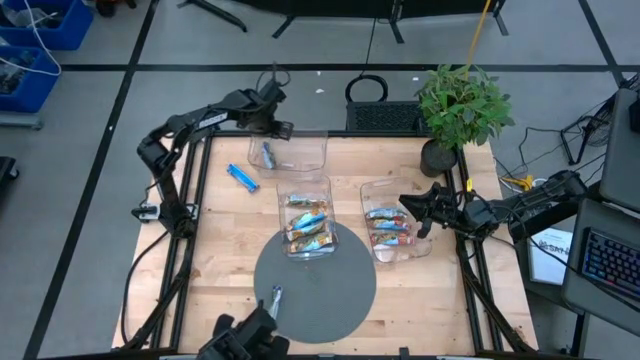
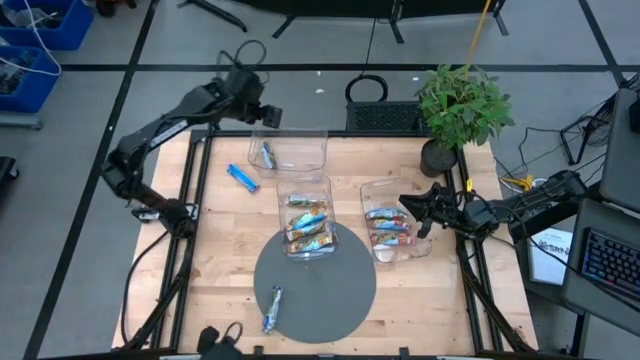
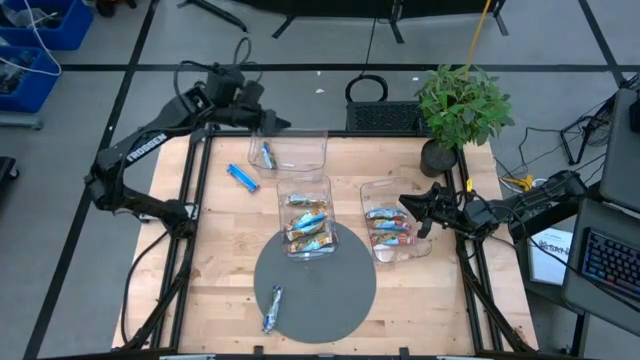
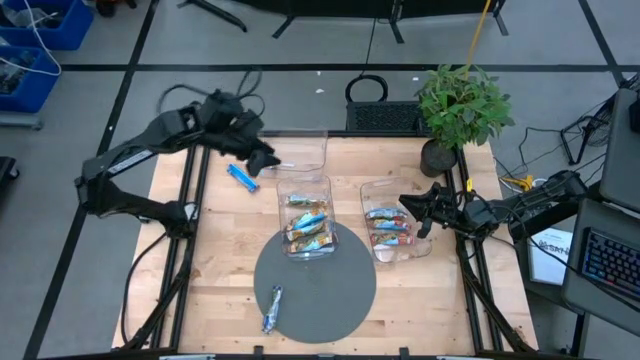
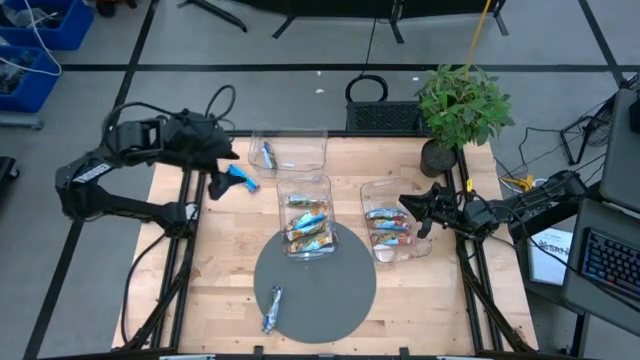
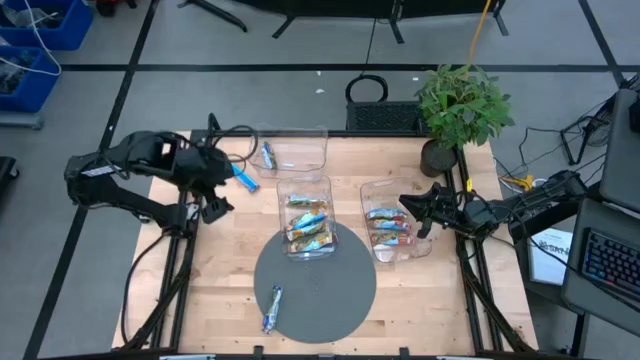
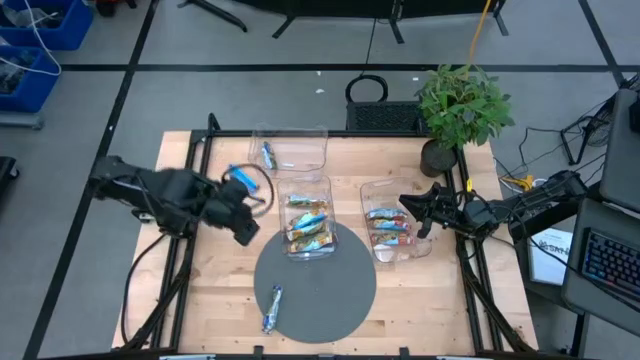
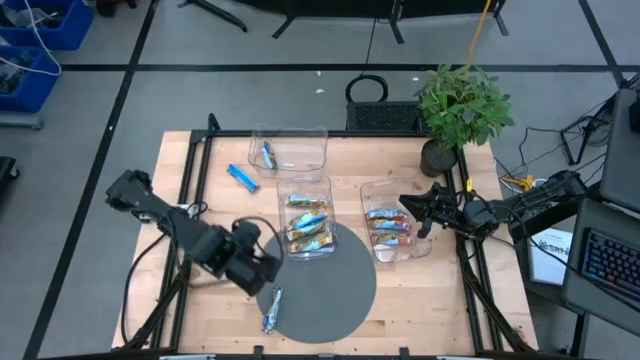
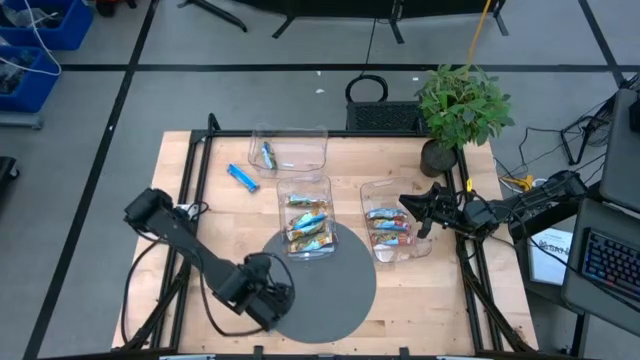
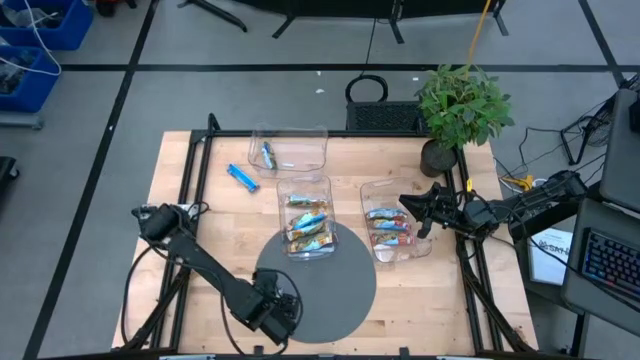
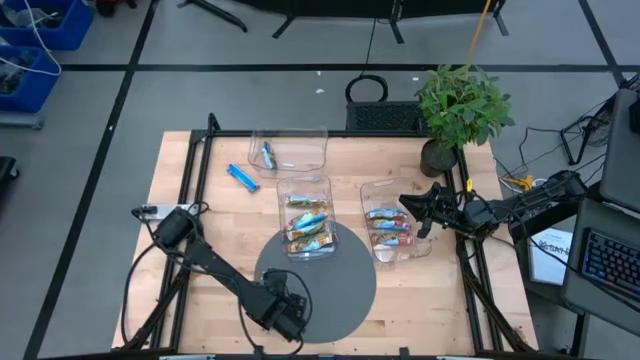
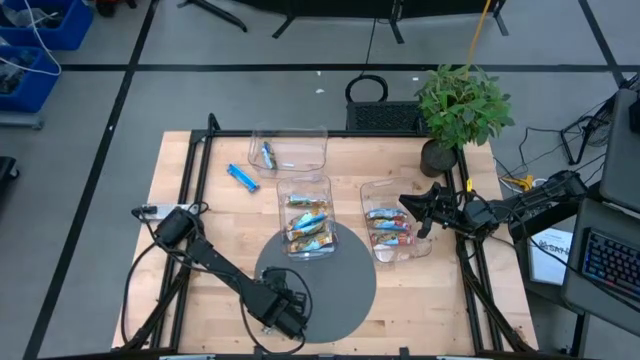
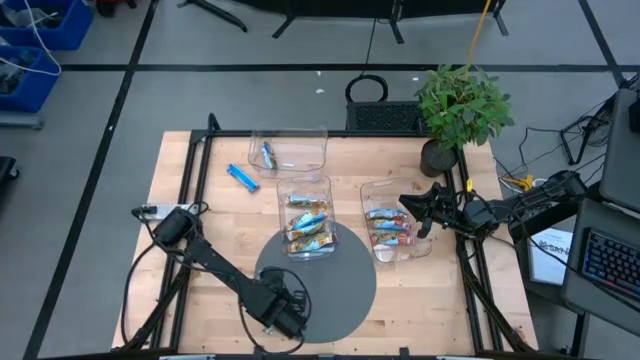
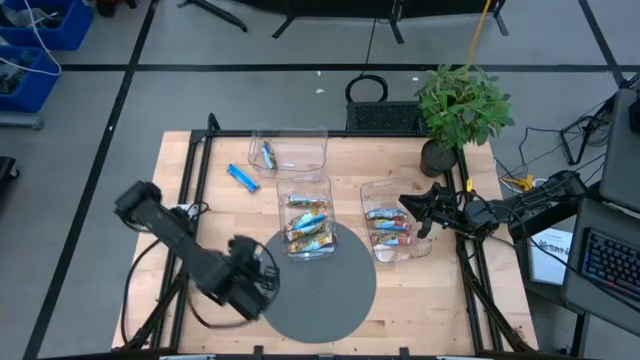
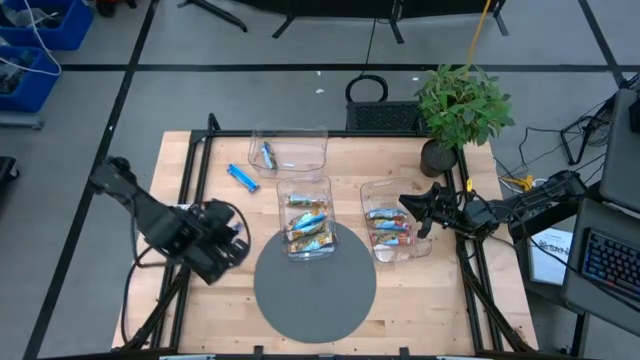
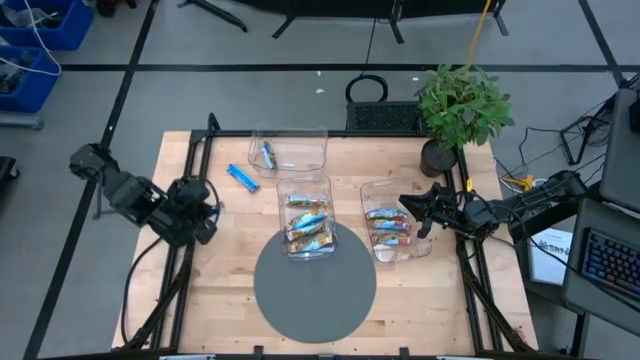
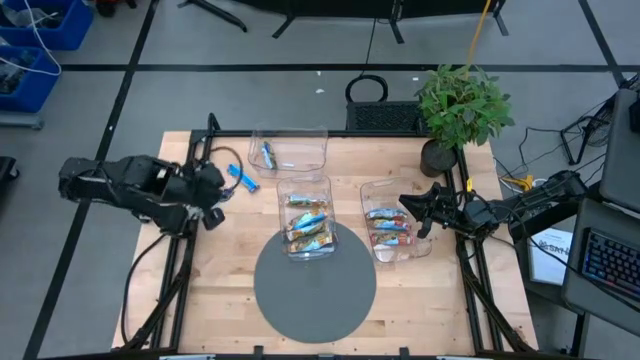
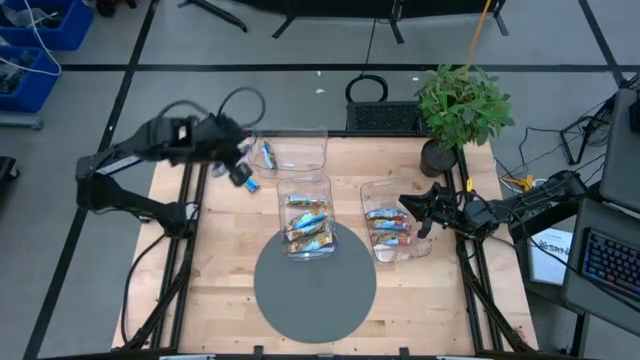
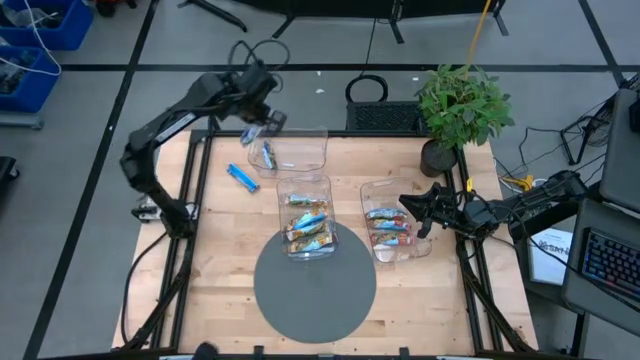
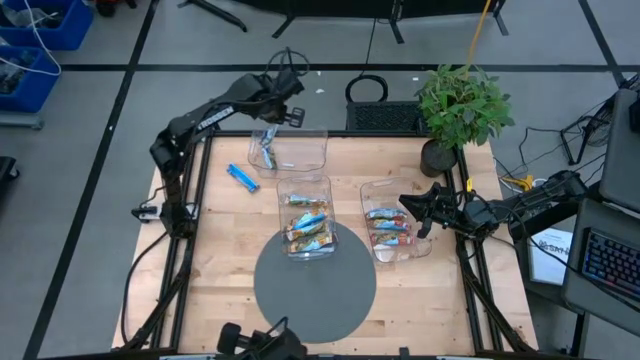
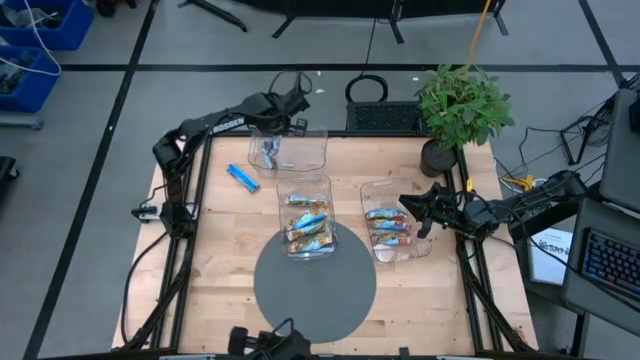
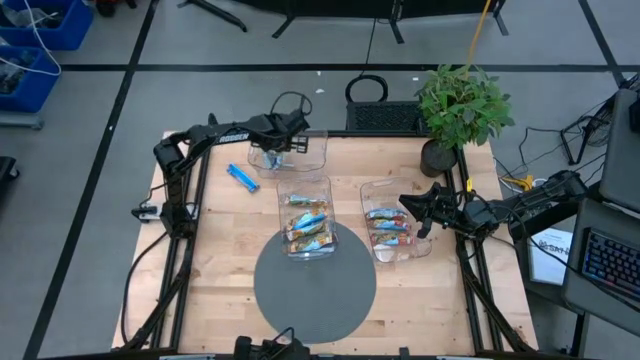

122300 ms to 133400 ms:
Task: Pick and place Granola Bars by type
Put the blue granola bar into the top transparent bin

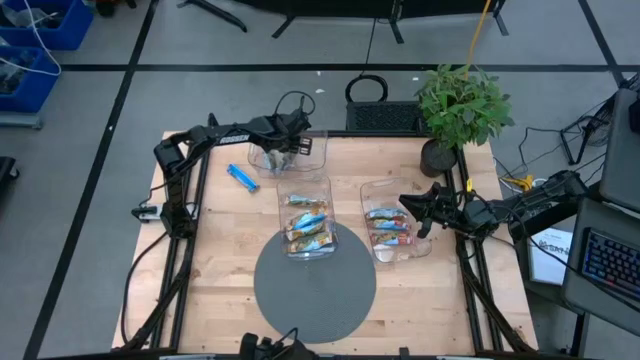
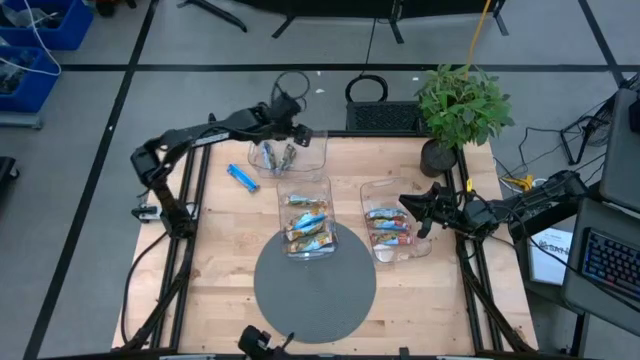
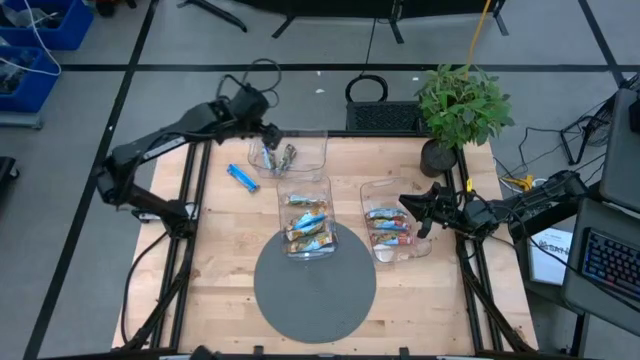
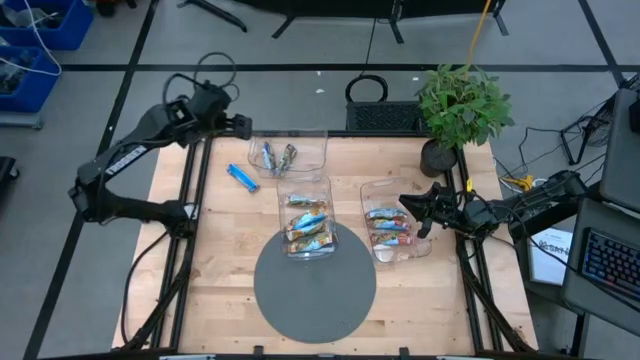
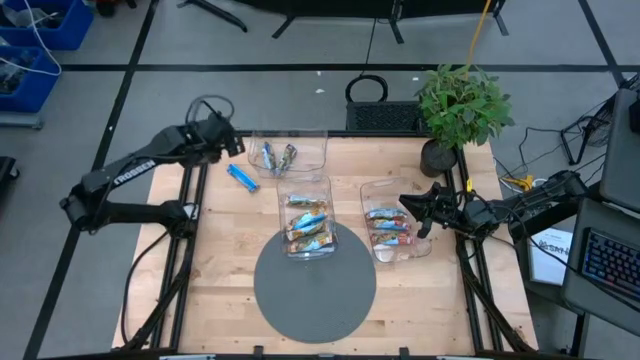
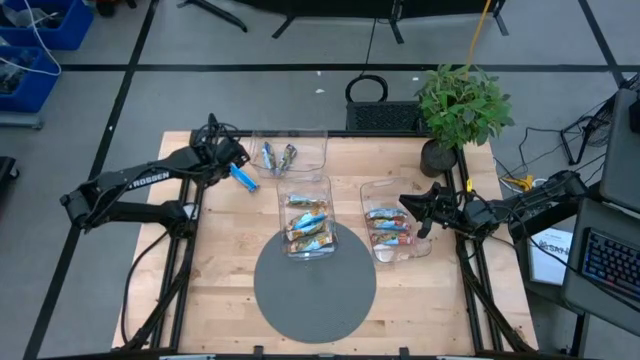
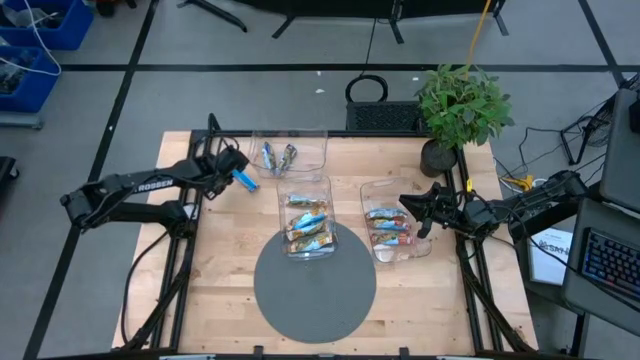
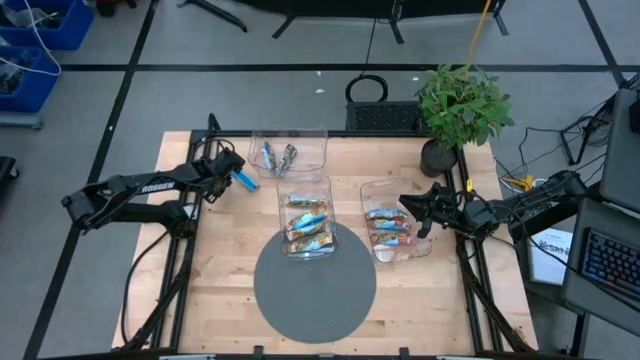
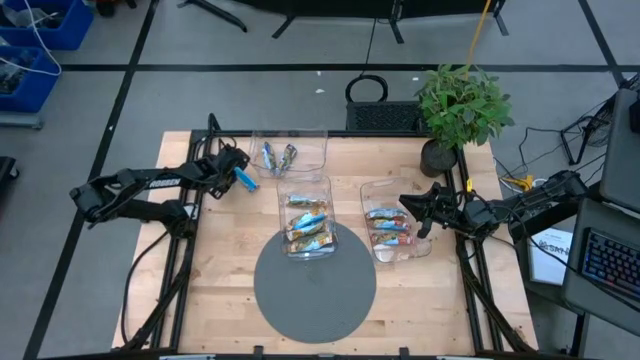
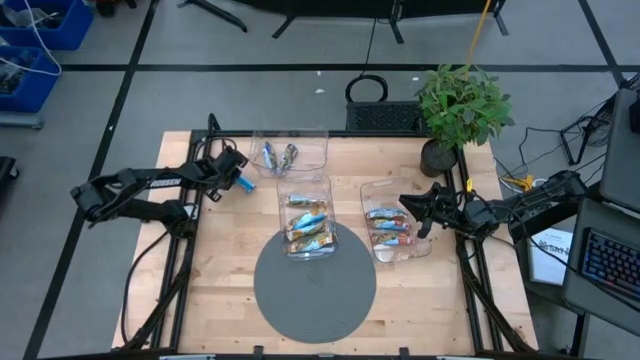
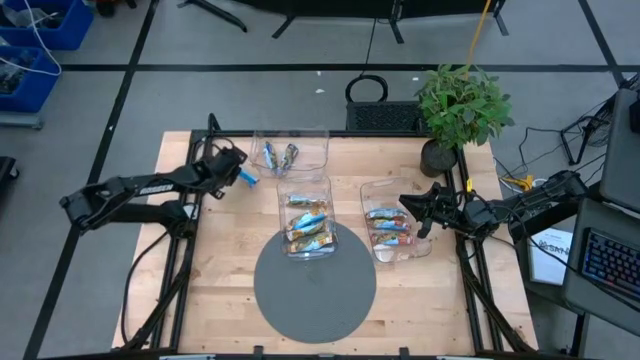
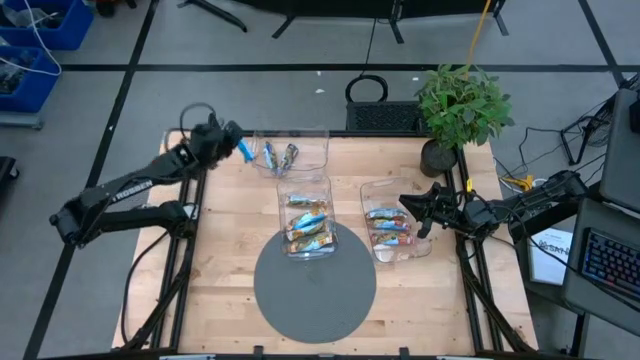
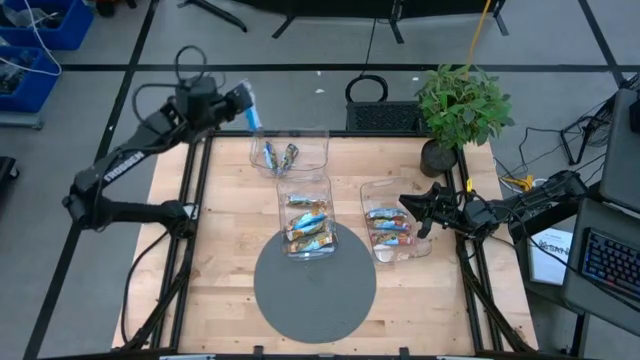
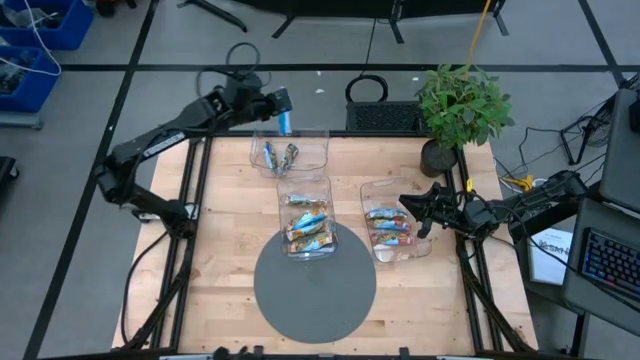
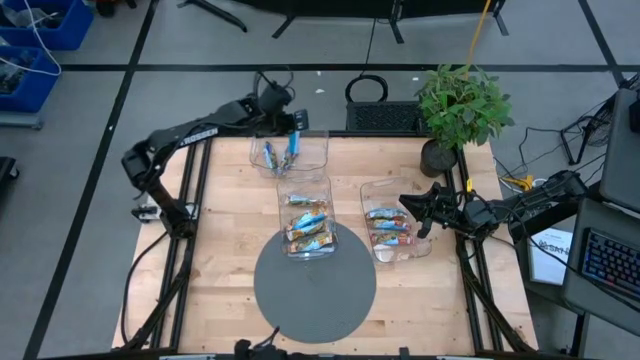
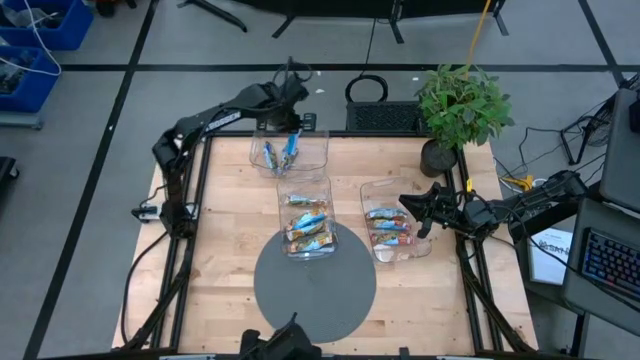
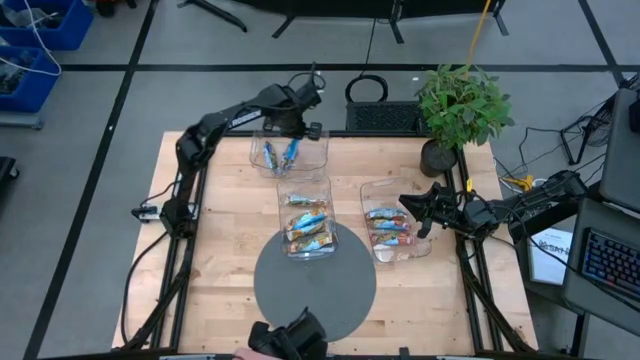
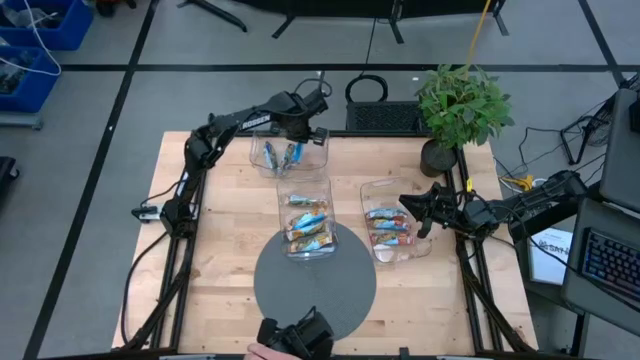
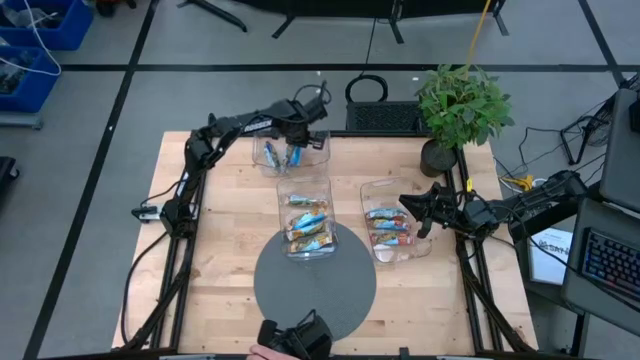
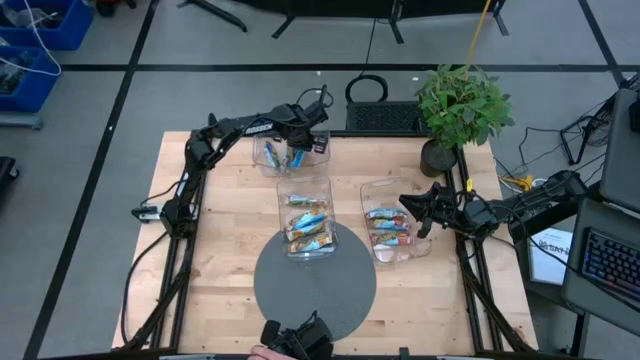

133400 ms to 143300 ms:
Put the blue granola bar into the top transparent bin

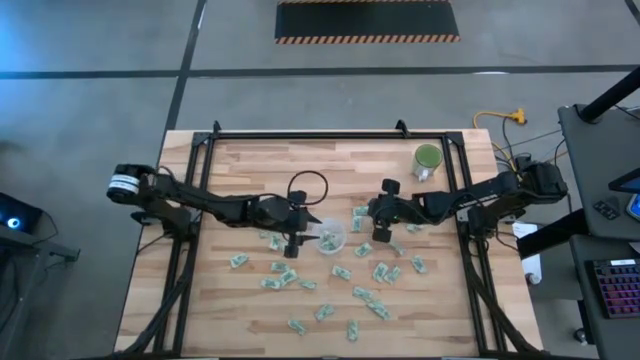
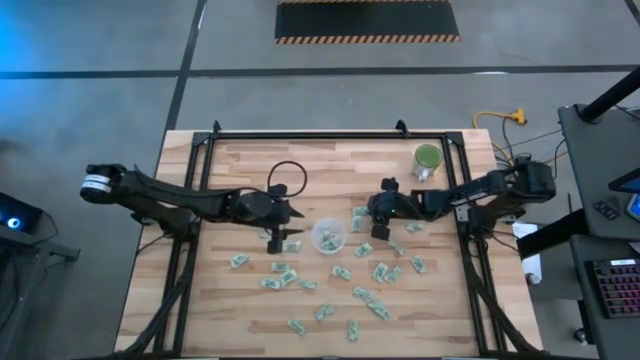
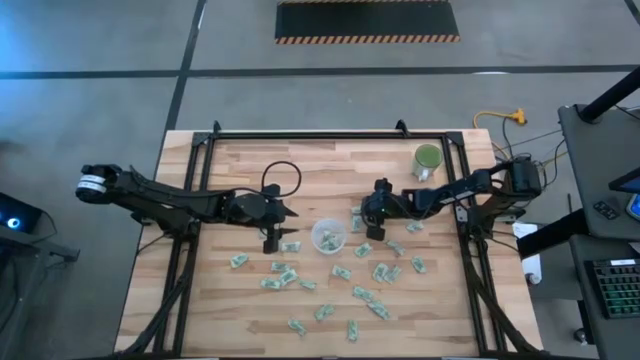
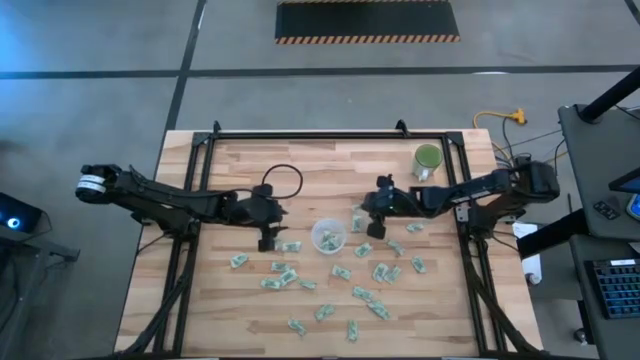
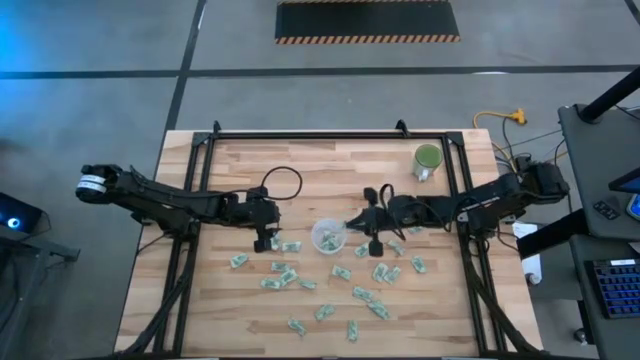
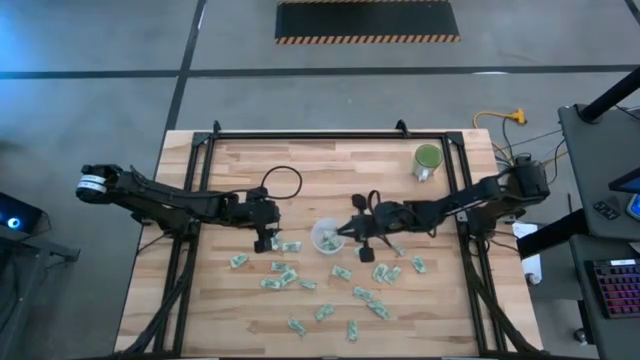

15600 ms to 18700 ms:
Task: Pick and place Stevia / Truvia into bins
Put the light green stevia packet into the transparent container
